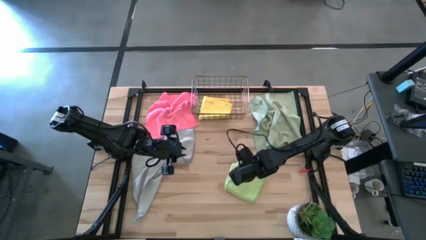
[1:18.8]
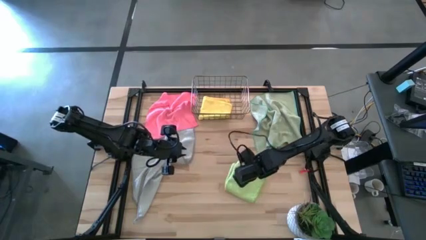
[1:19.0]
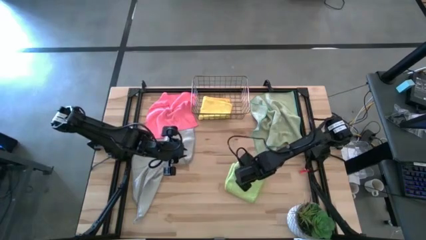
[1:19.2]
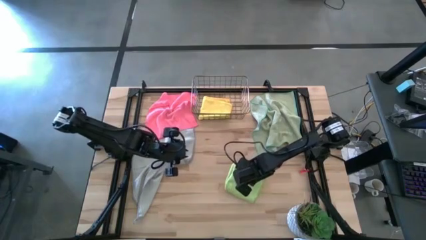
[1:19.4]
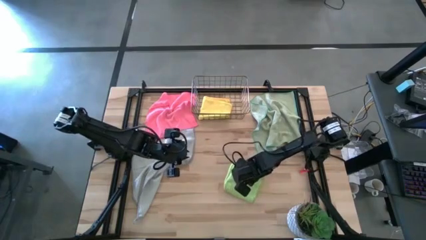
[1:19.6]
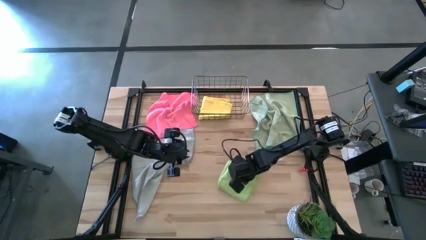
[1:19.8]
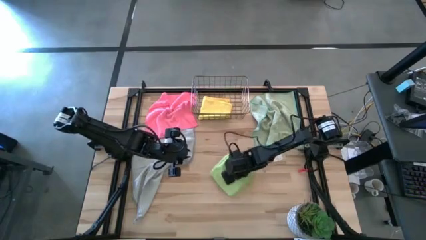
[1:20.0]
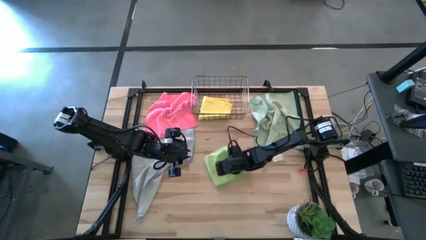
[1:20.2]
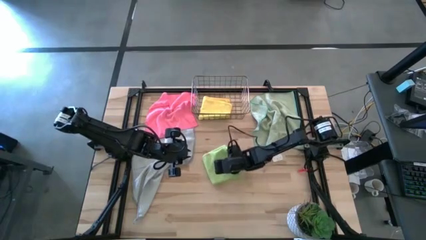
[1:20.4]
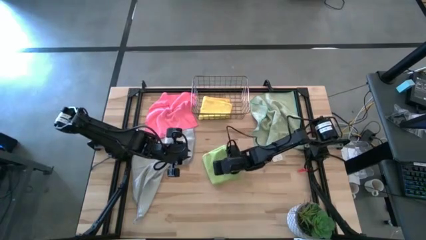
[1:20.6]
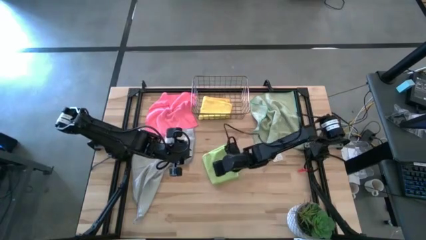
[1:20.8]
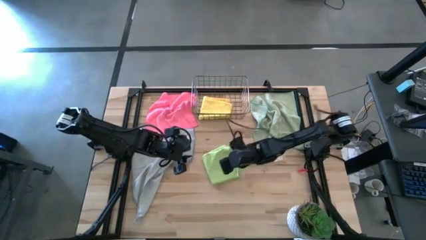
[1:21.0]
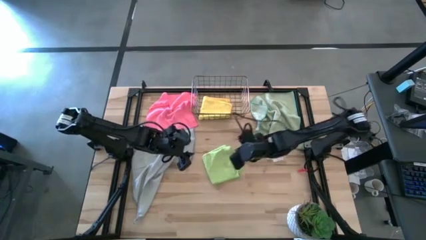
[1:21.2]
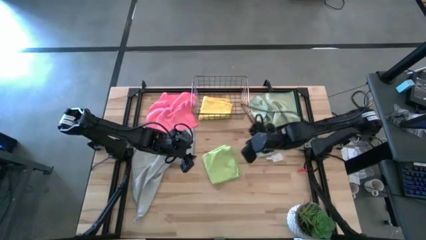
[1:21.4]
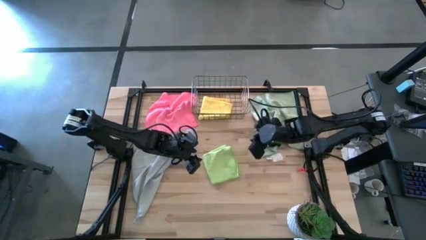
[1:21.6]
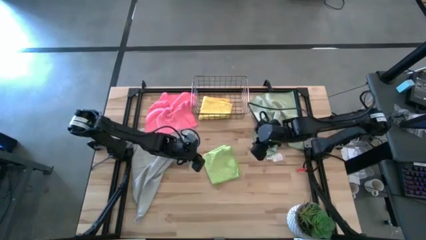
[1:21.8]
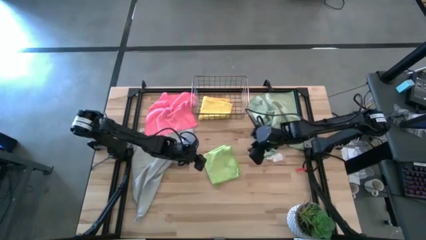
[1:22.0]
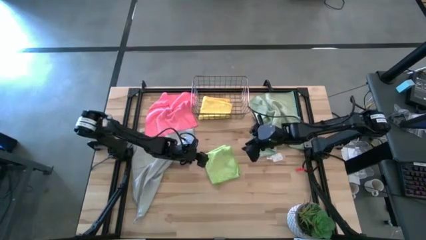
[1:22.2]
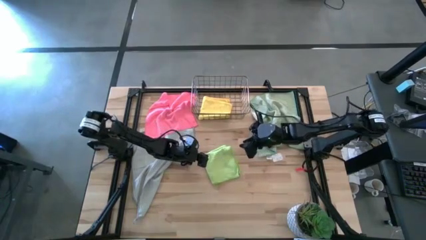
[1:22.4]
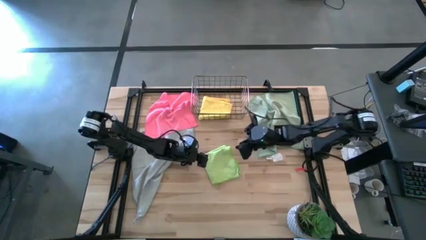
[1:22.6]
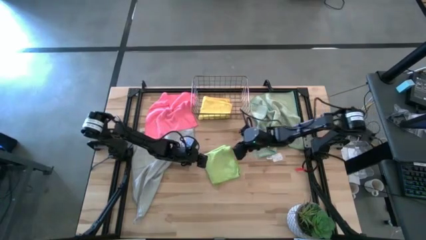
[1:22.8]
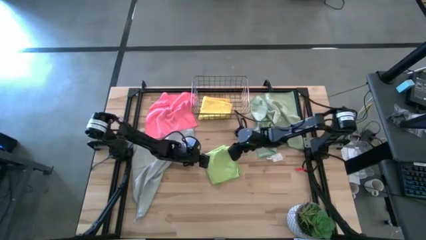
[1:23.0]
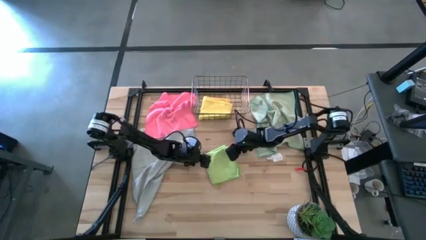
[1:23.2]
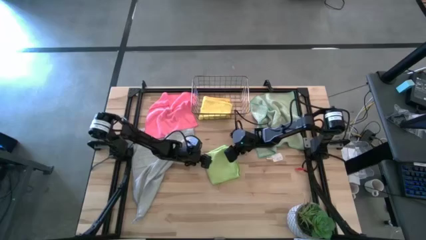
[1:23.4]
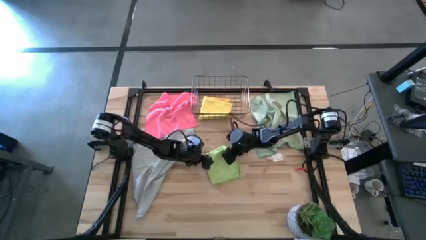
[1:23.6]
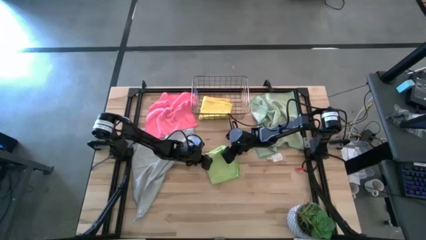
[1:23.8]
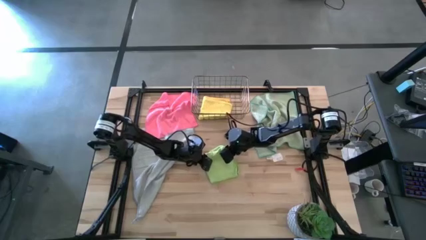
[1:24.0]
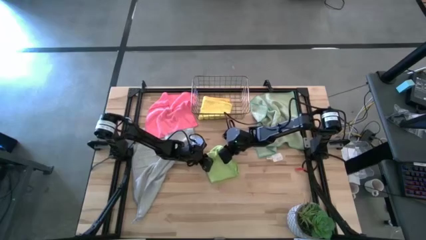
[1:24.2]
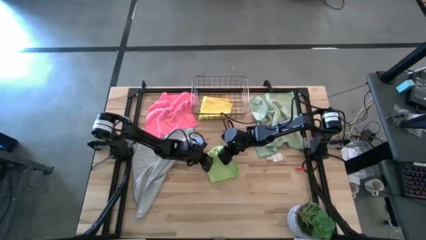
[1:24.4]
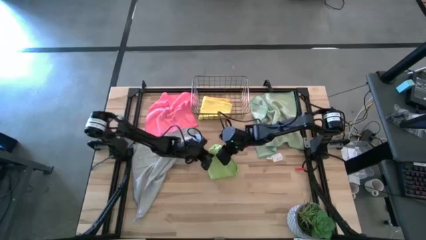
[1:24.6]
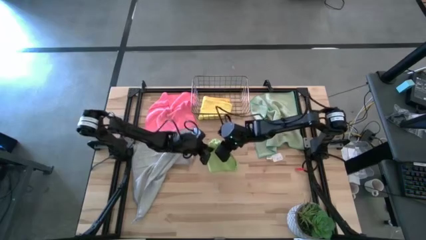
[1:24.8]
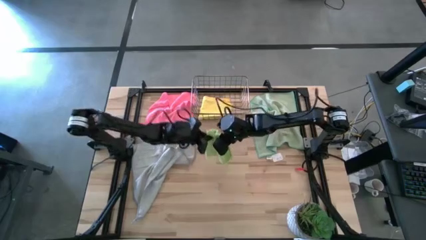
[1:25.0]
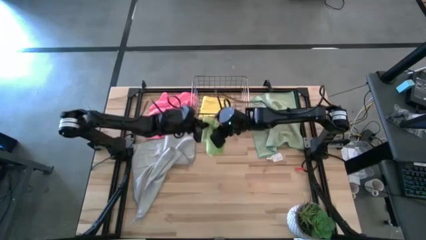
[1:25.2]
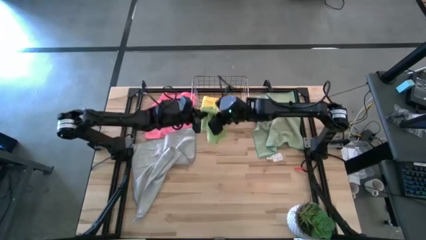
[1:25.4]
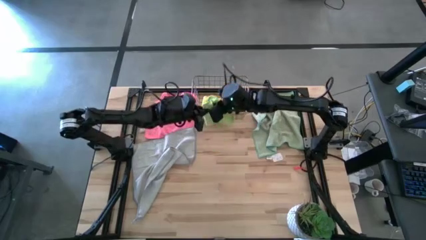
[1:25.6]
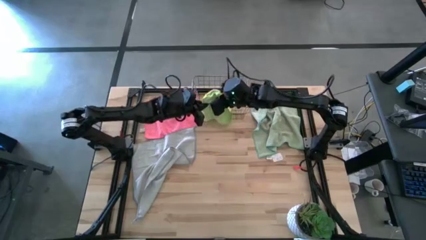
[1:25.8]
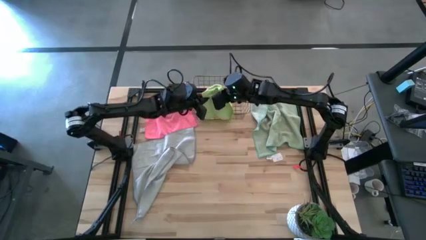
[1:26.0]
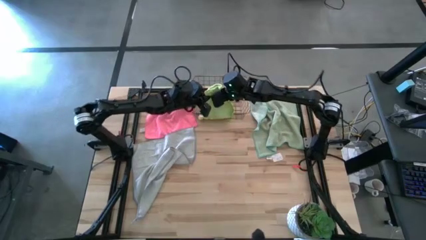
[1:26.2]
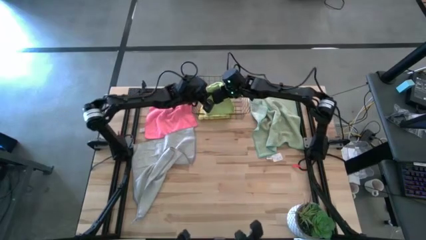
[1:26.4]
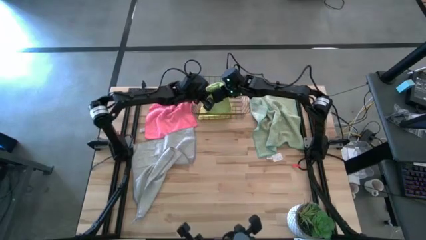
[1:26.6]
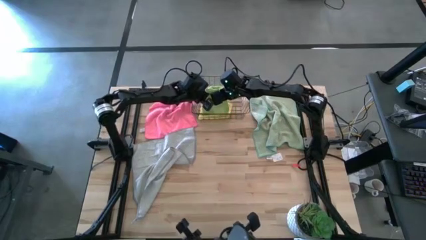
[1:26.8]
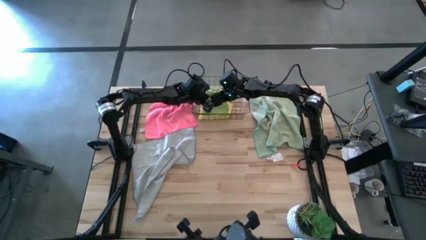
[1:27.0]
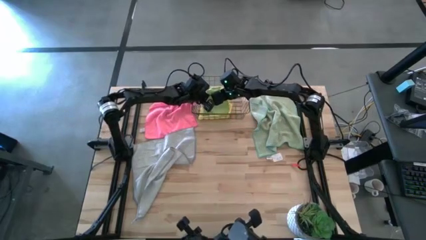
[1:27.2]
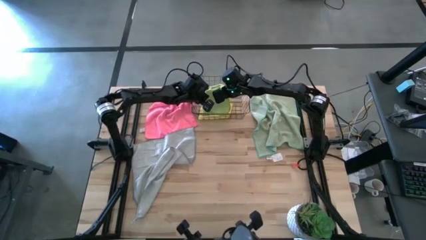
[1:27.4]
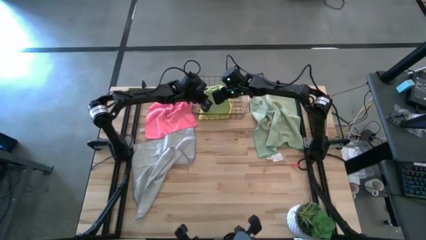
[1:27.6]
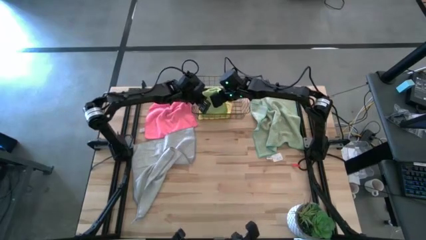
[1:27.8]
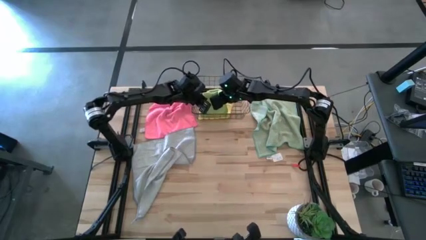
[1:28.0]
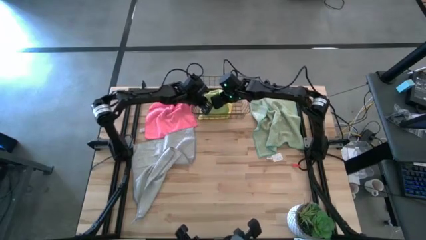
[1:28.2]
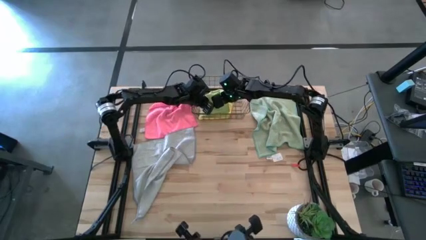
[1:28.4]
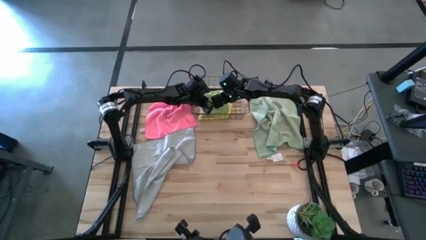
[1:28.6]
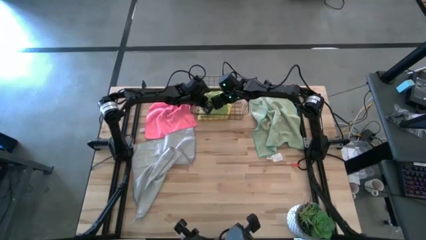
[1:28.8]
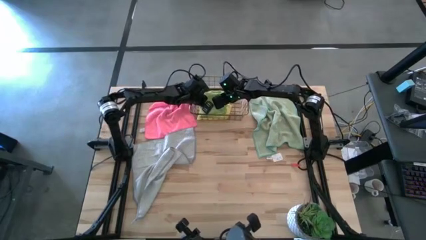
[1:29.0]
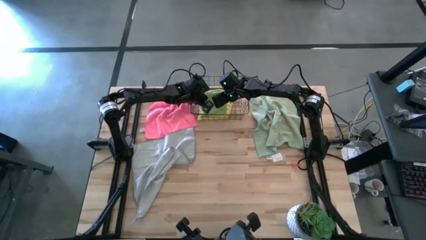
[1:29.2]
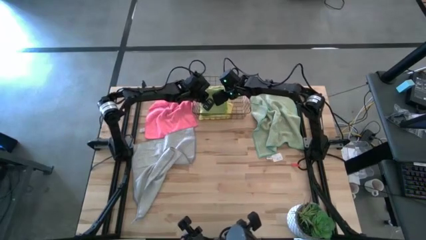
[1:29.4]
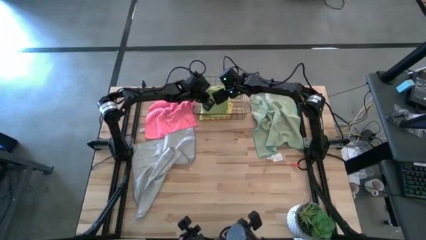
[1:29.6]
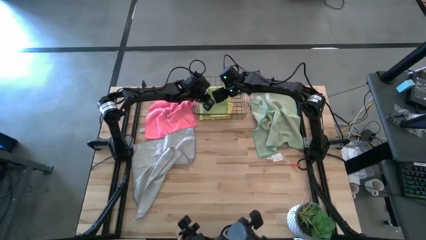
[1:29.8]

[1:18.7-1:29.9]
Task: Fold microfiber towels
Put the green towel into the wire basket
